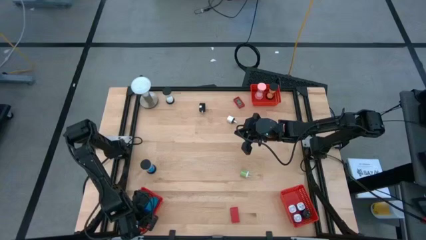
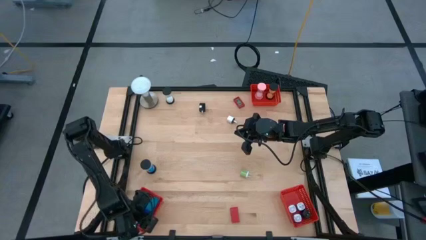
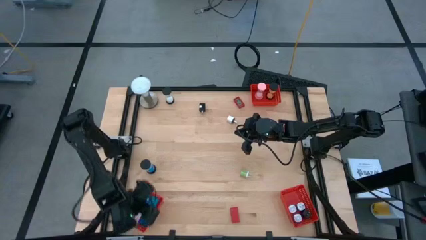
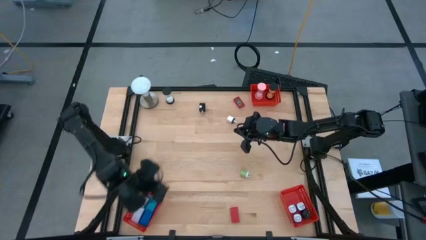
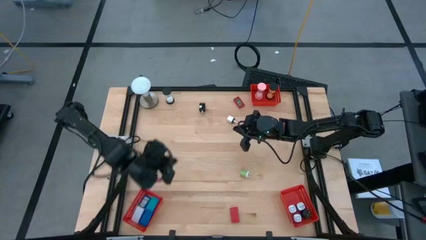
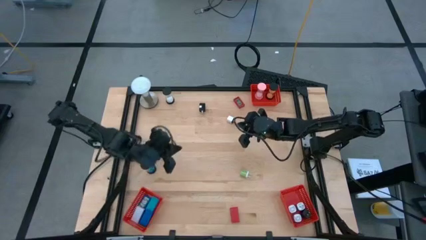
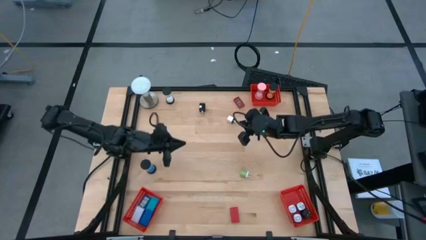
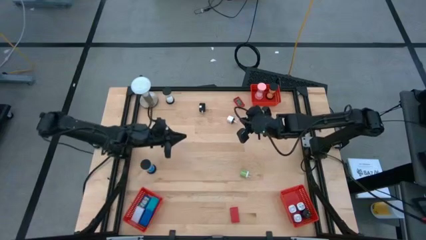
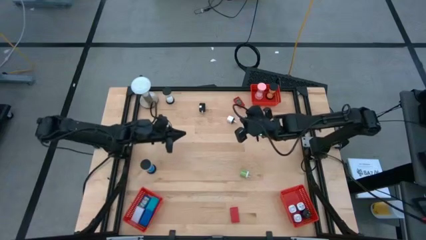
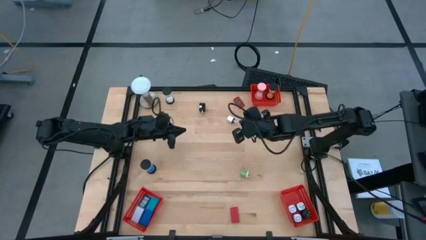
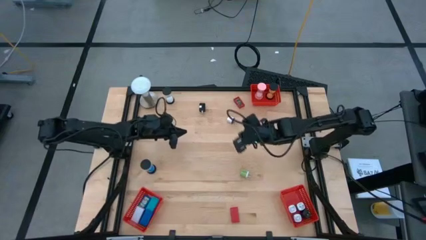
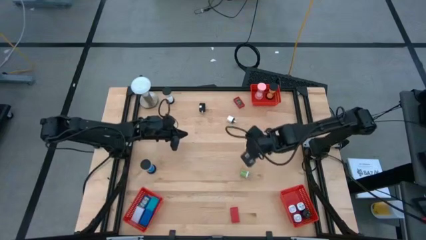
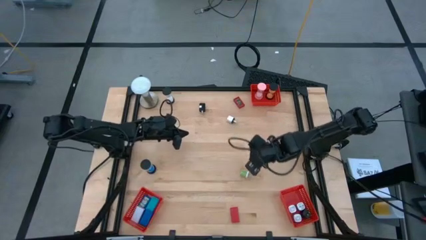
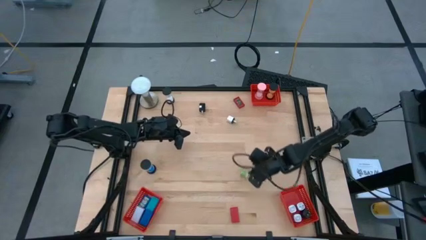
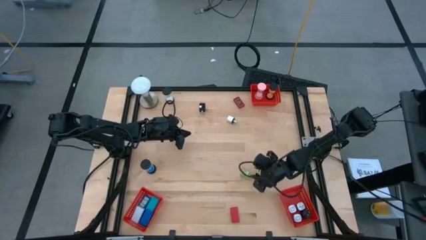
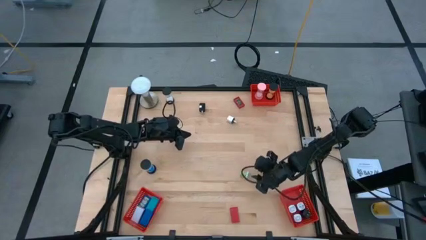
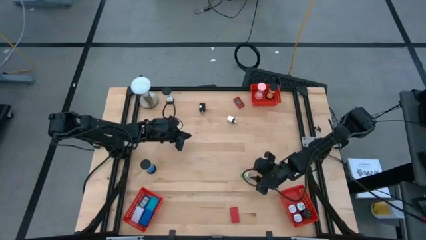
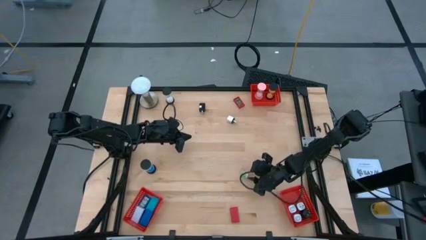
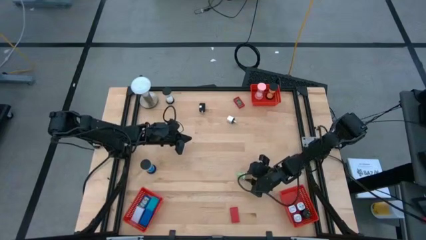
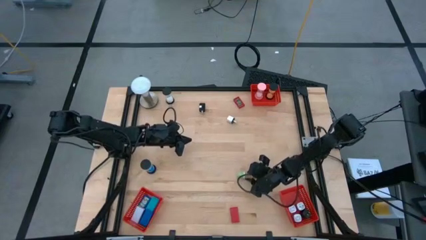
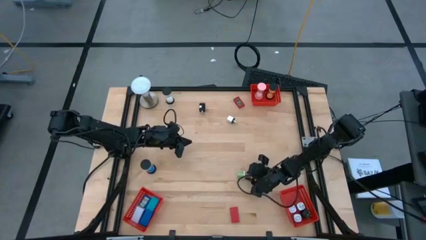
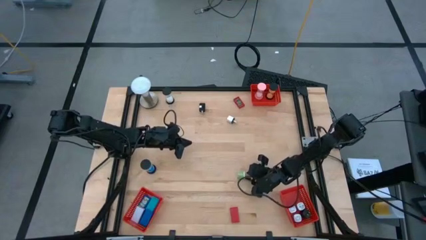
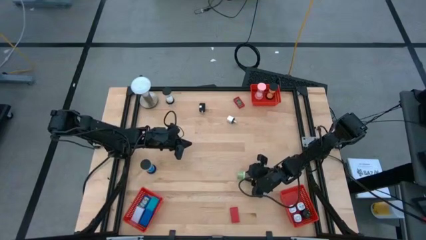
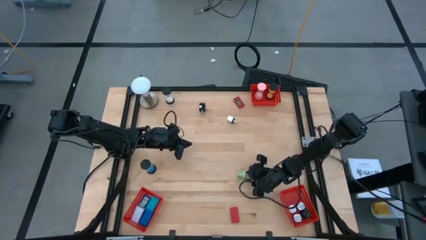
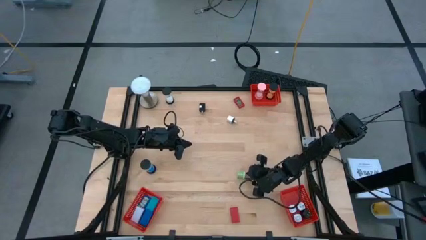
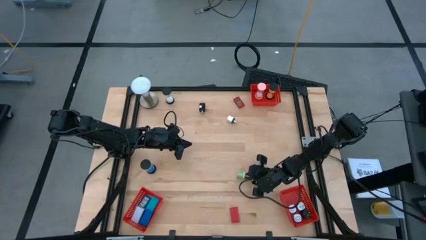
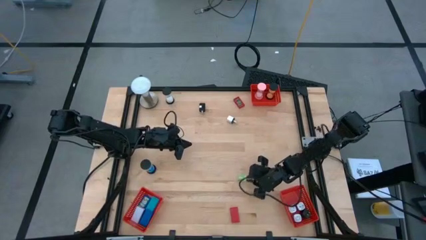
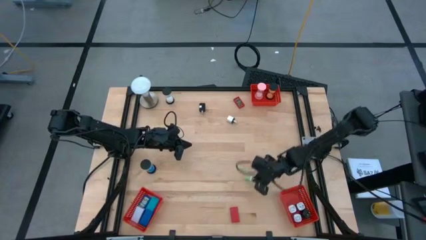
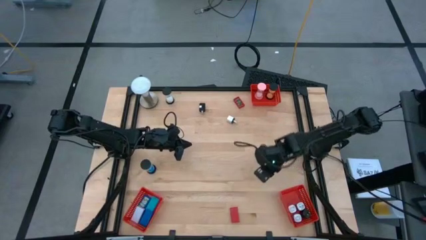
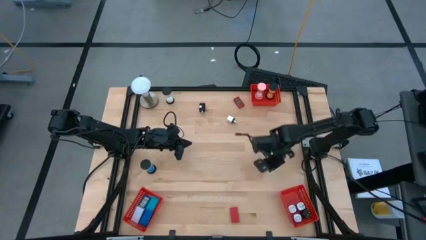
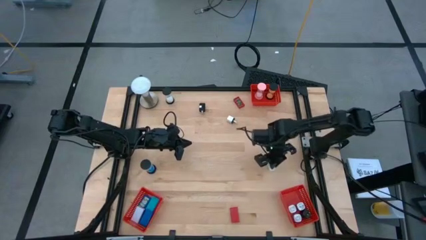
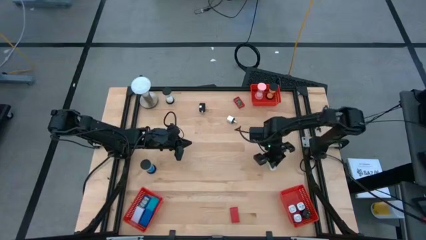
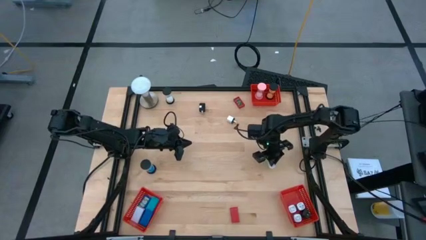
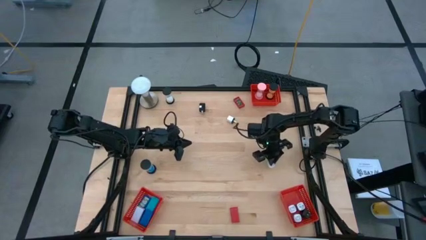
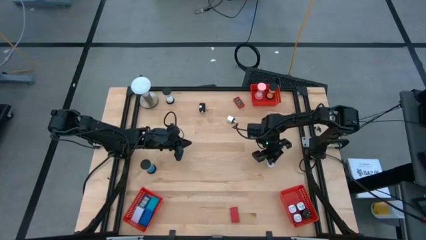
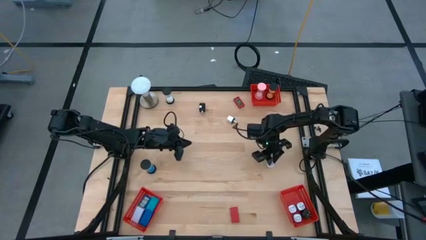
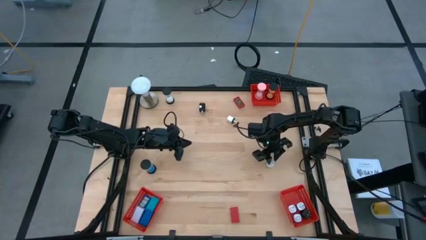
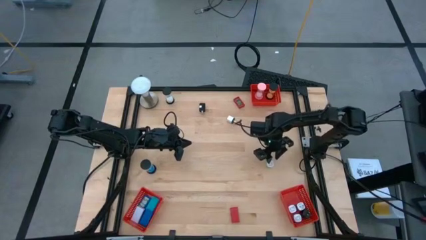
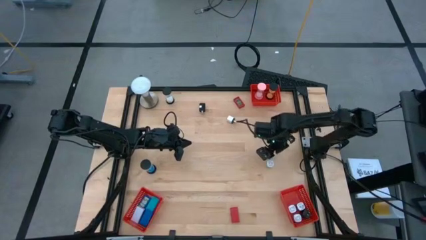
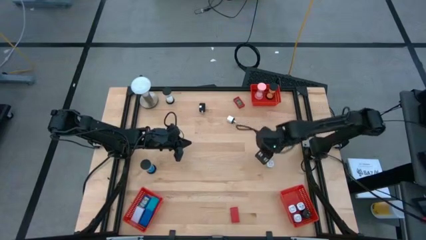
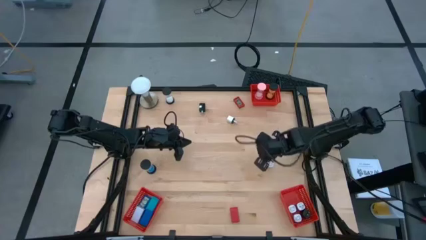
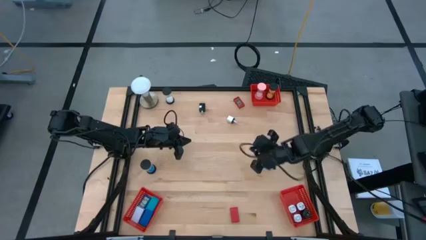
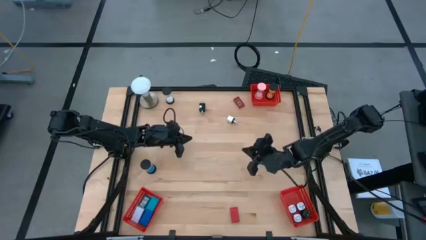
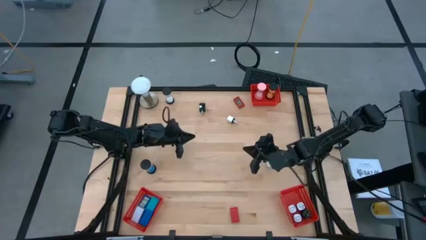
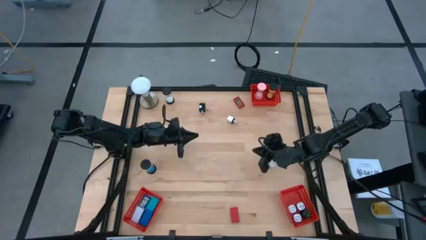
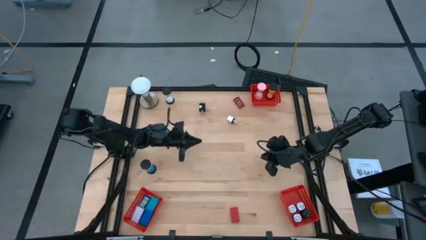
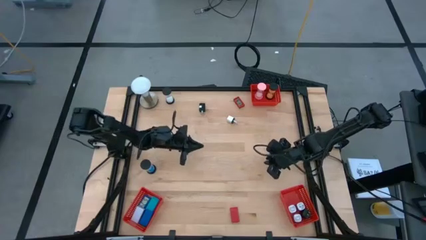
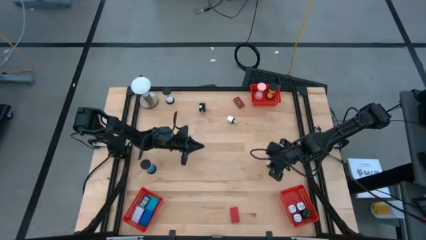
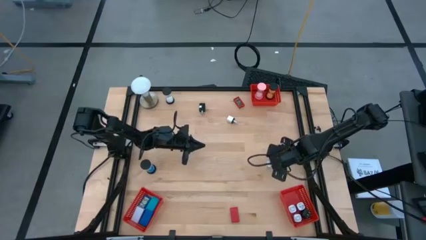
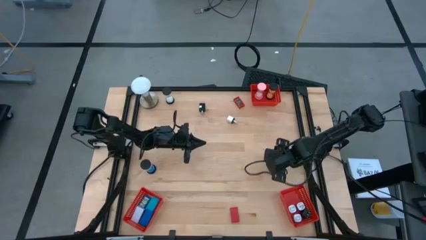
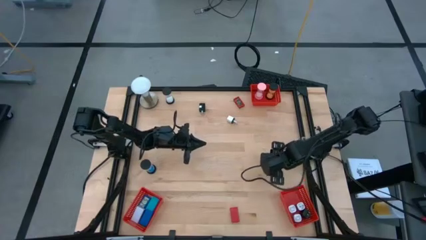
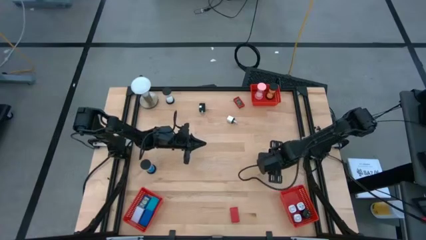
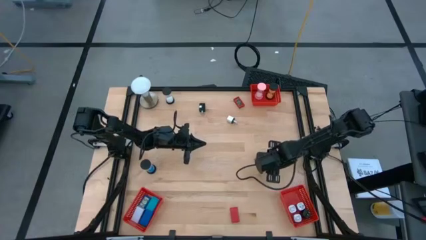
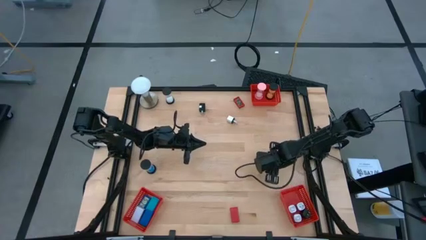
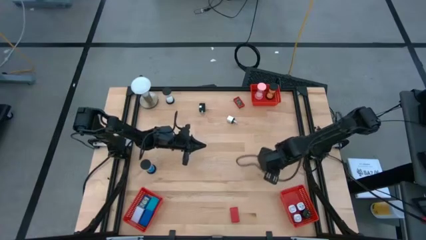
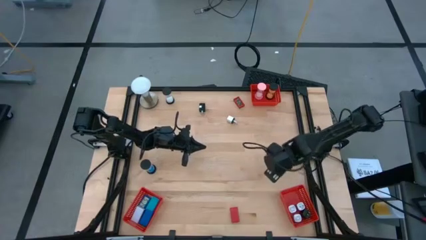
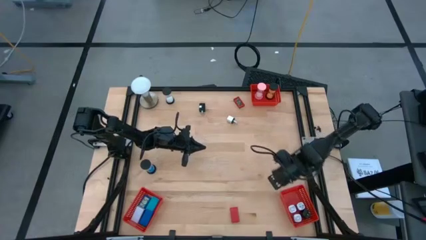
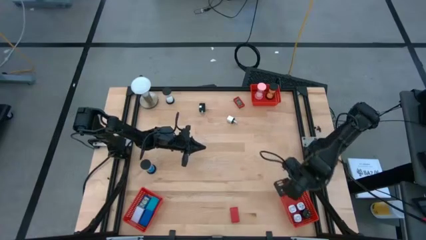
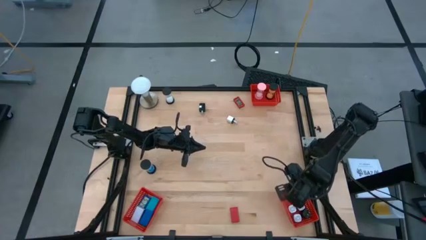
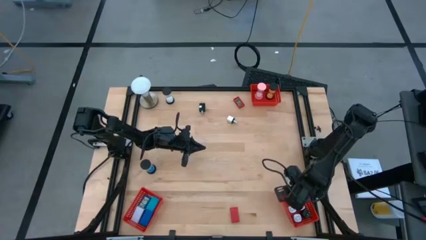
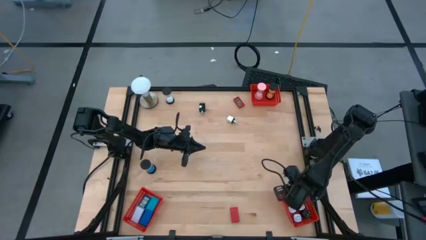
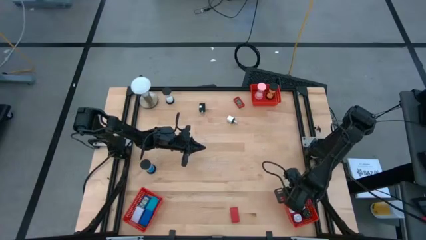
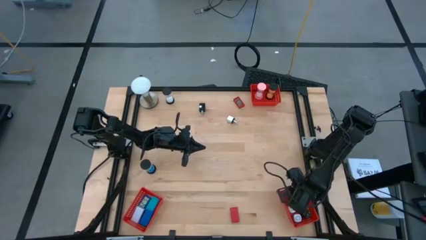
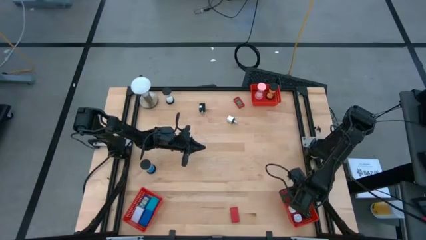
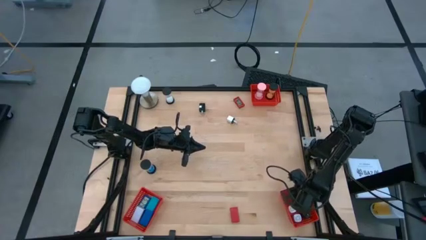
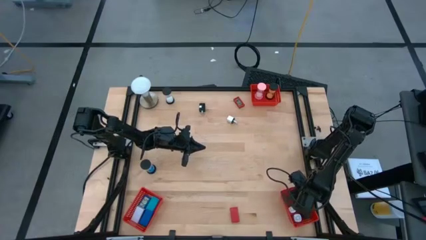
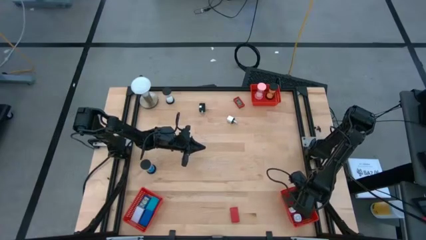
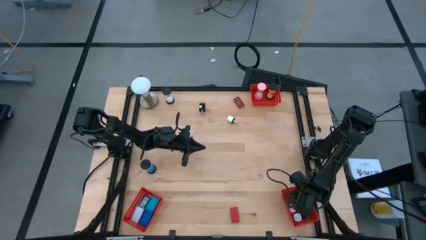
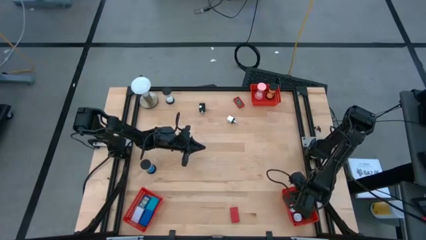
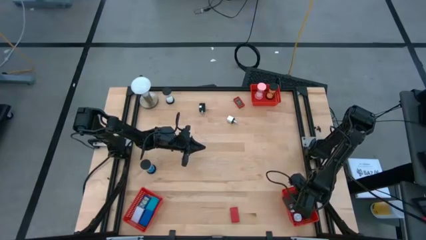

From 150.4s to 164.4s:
Task: Pick & Place Office items
Put the green charger adapter into the bottom right red basket

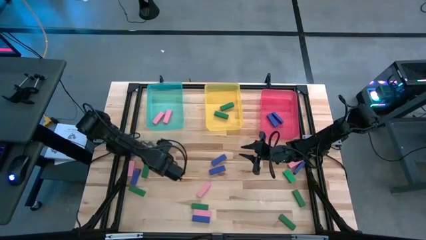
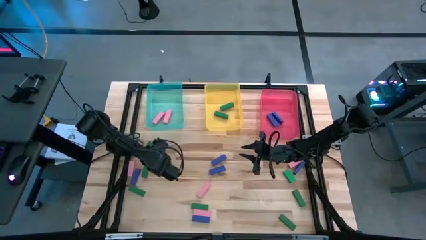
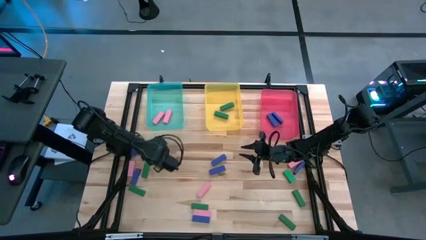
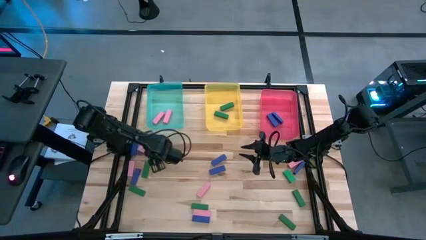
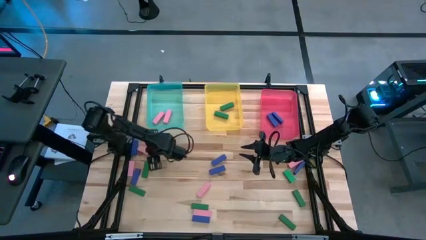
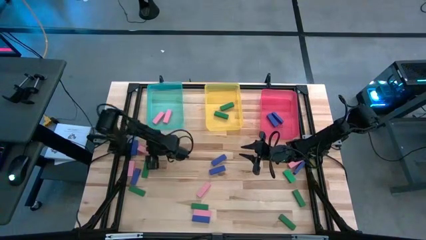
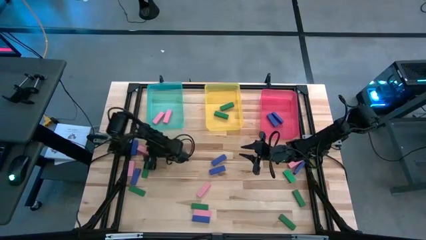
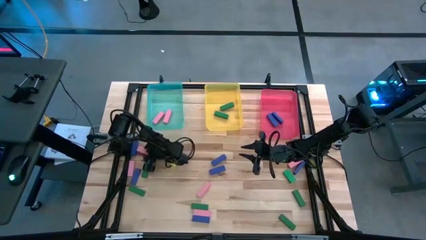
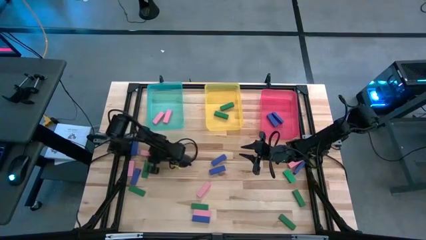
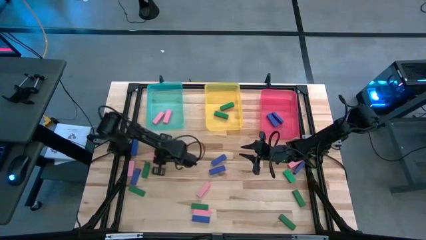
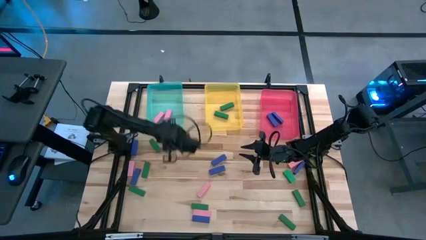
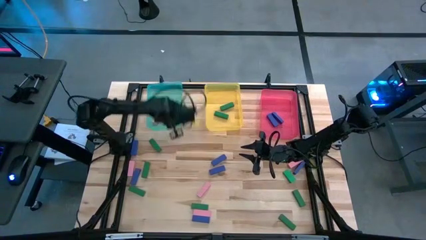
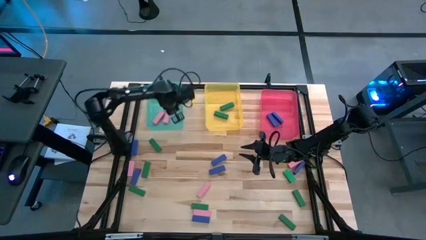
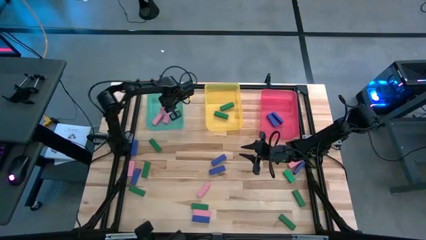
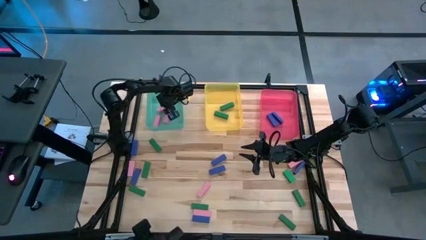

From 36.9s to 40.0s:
Task: Sort blocks
Put the pink wooden block into the blue bin

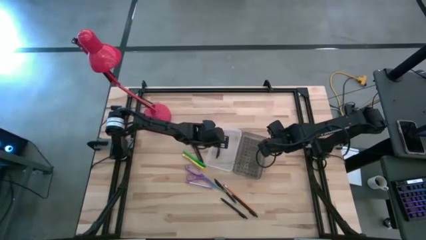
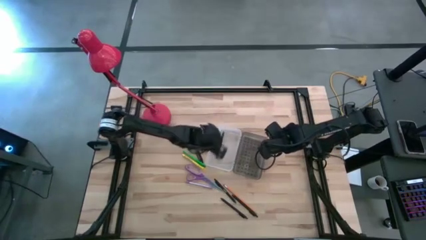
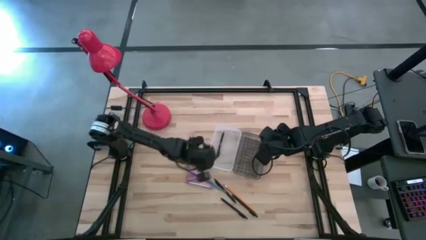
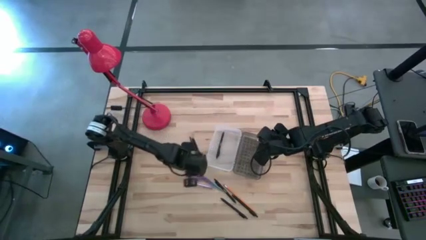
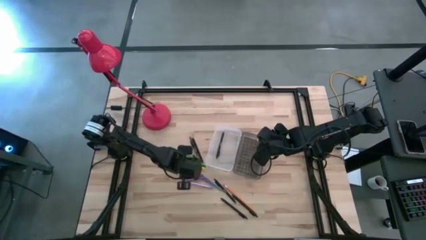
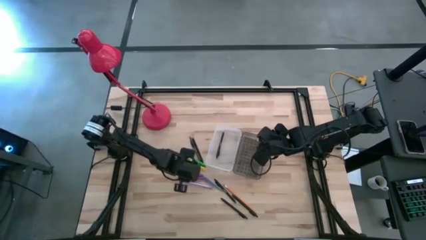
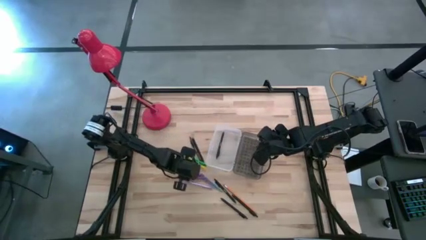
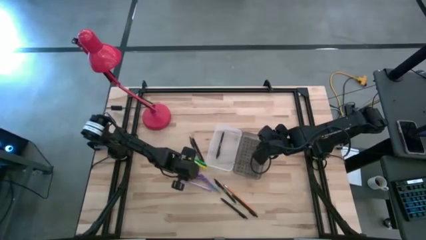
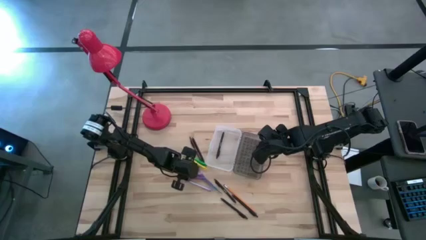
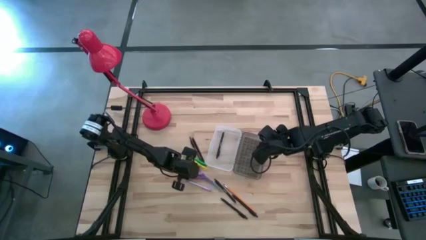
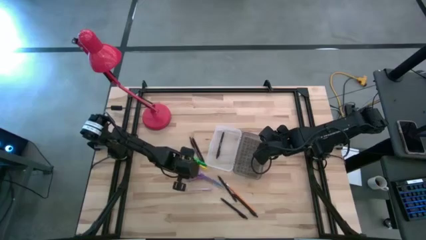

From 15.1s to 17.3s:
Task: Pick & place school supplies into a supply box
Put the purple scissors into the supply box
